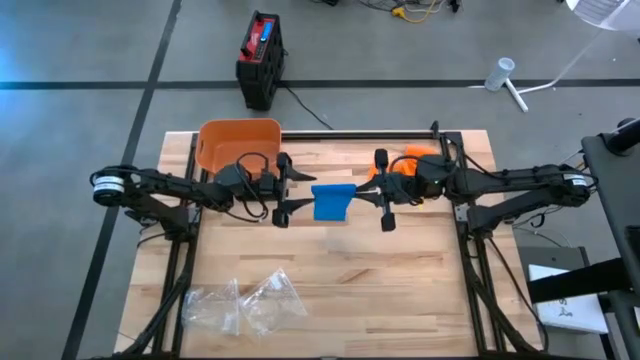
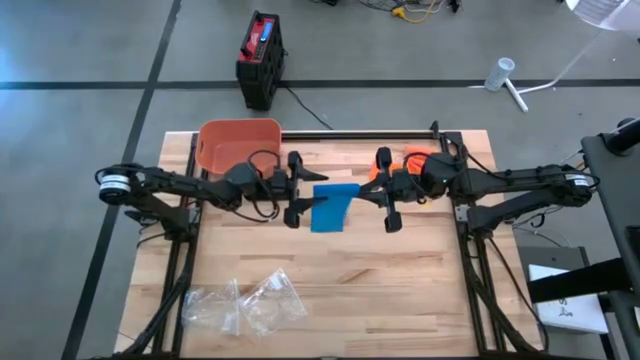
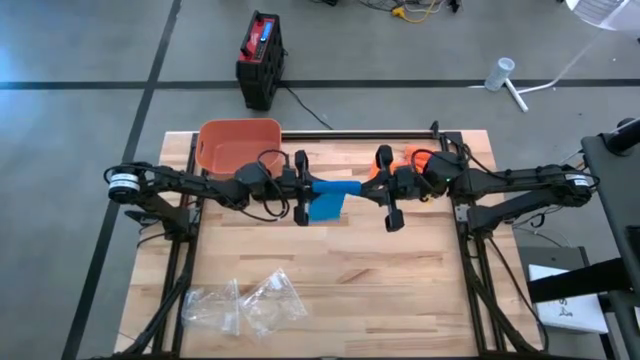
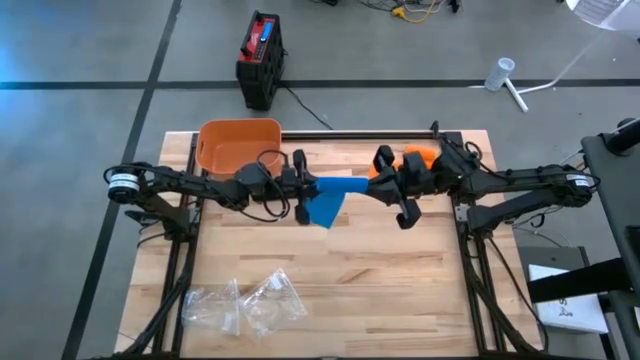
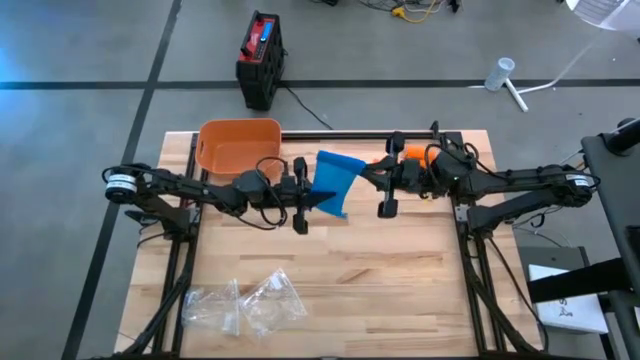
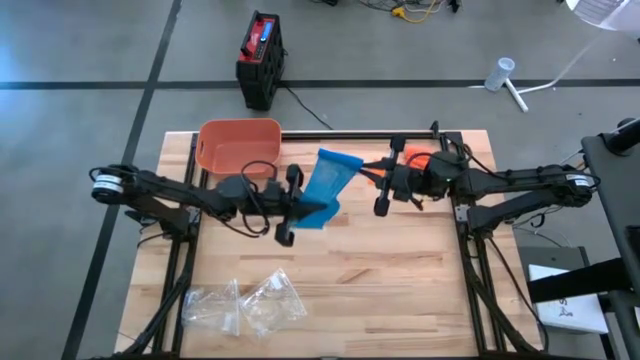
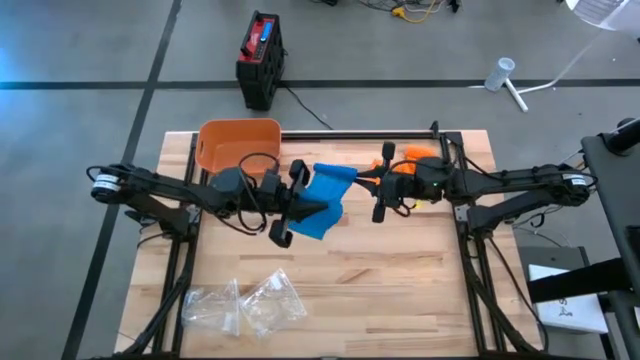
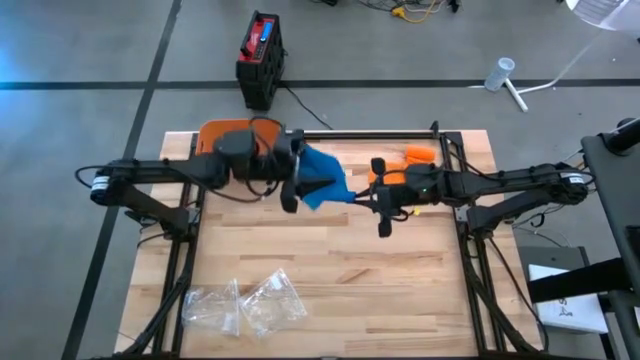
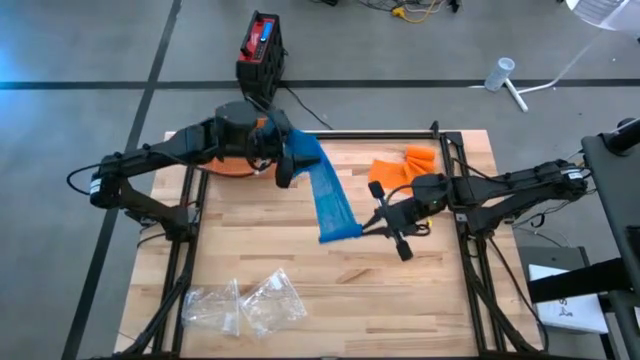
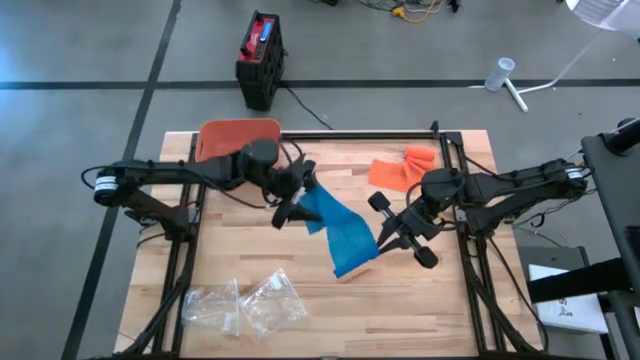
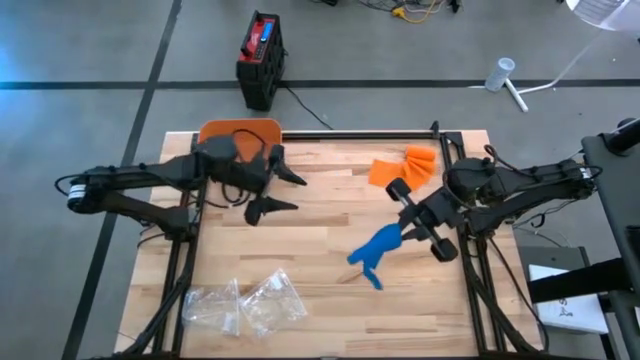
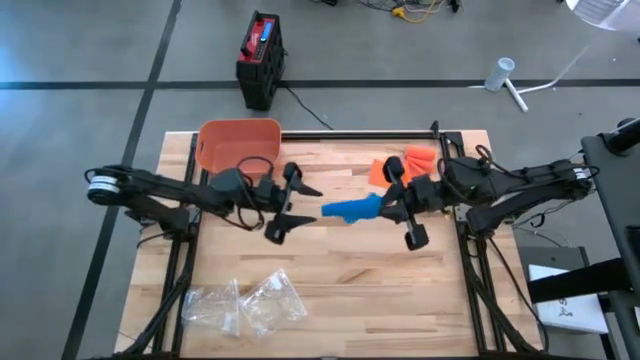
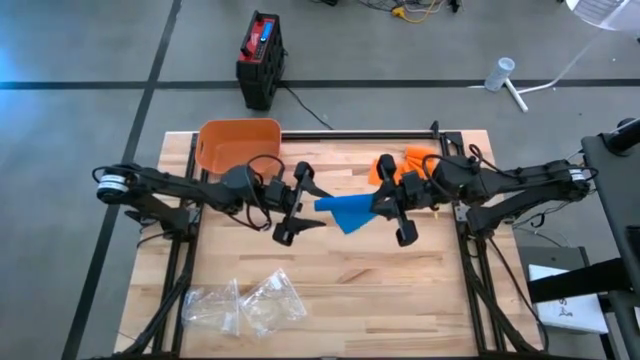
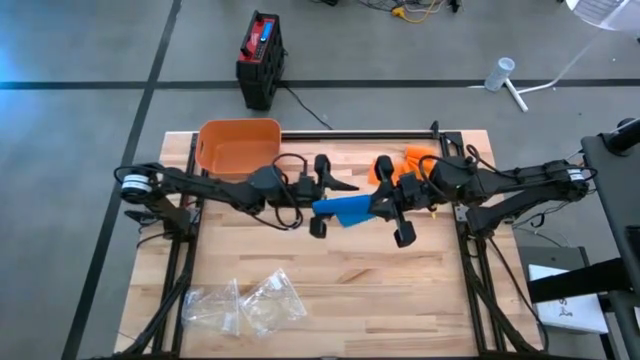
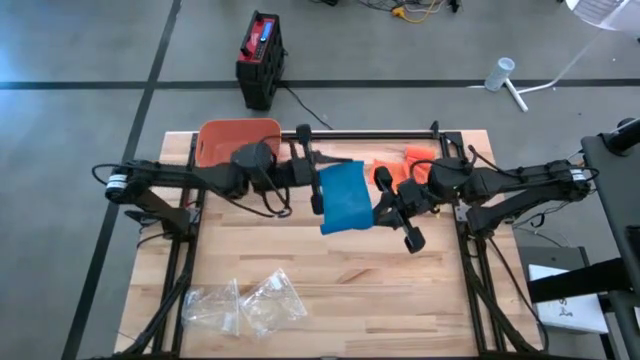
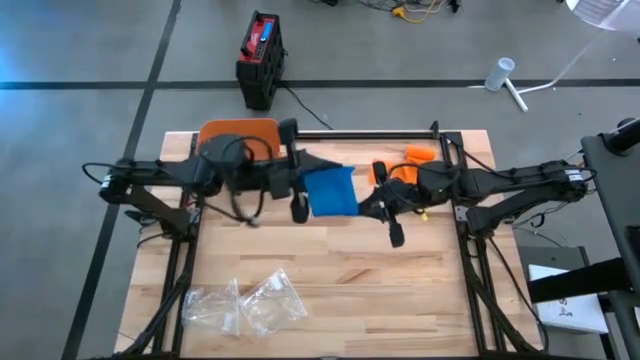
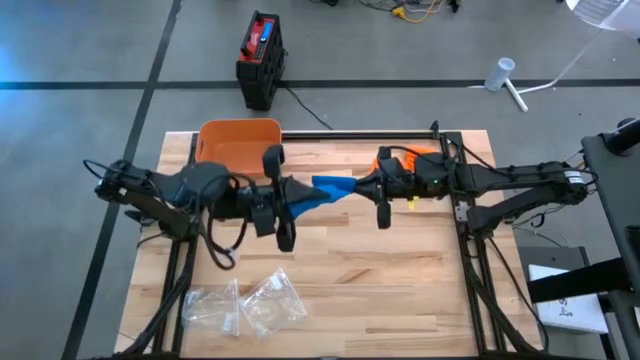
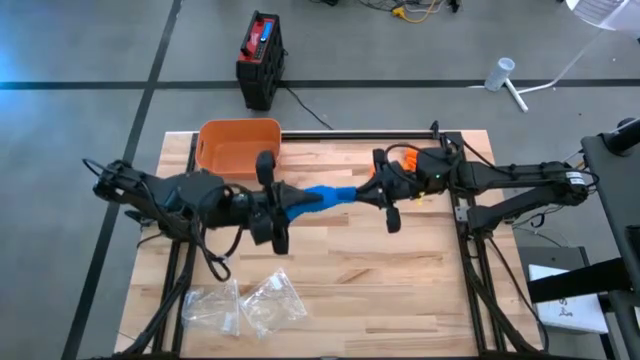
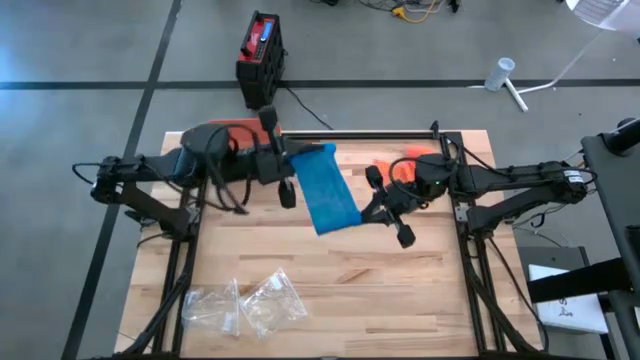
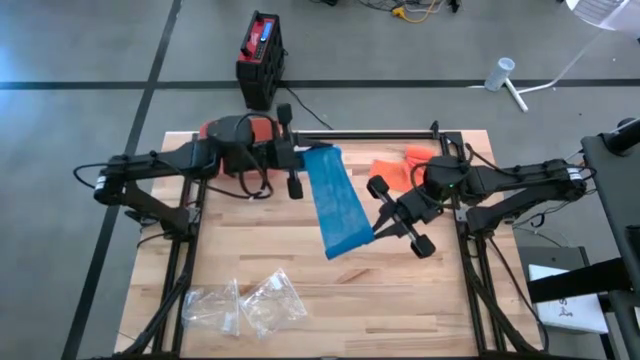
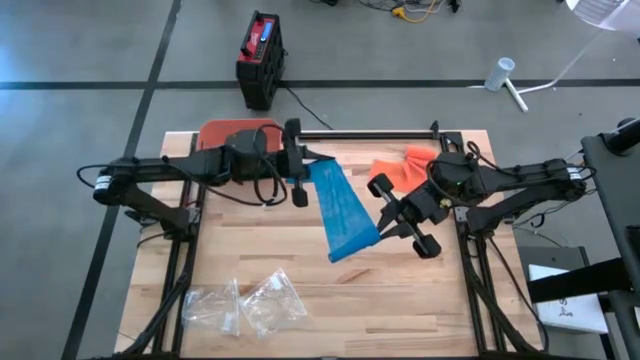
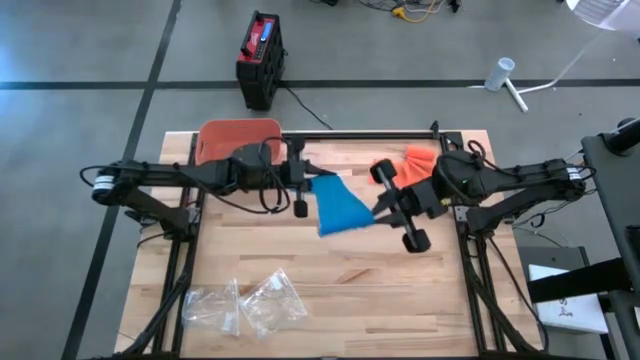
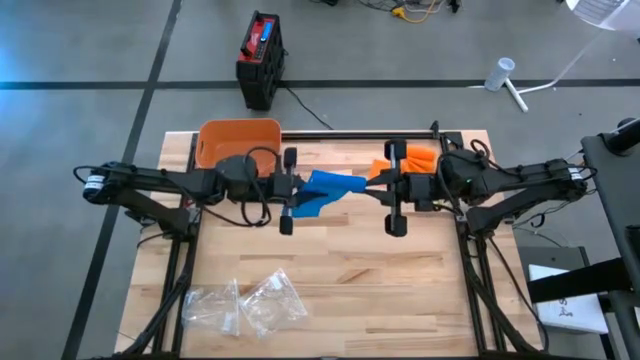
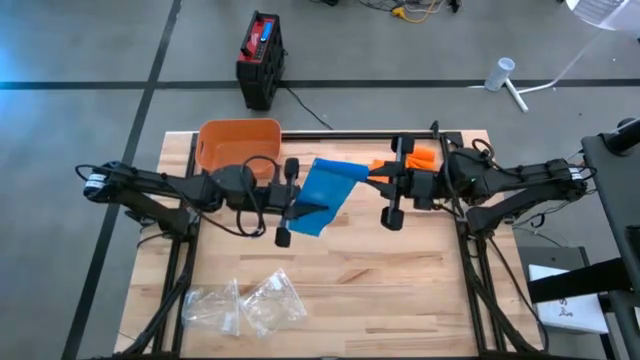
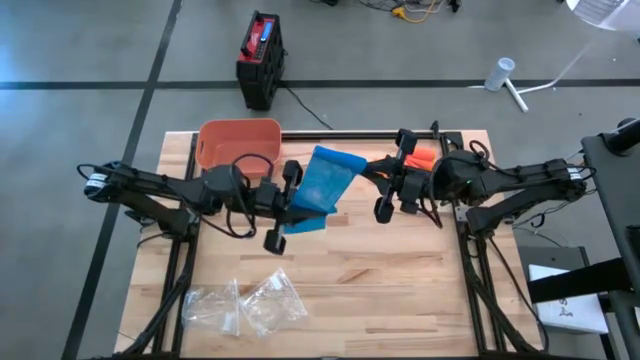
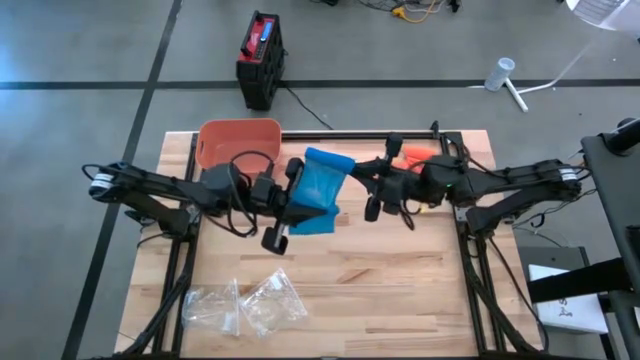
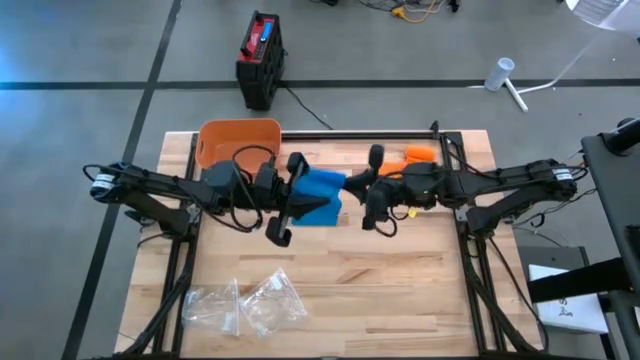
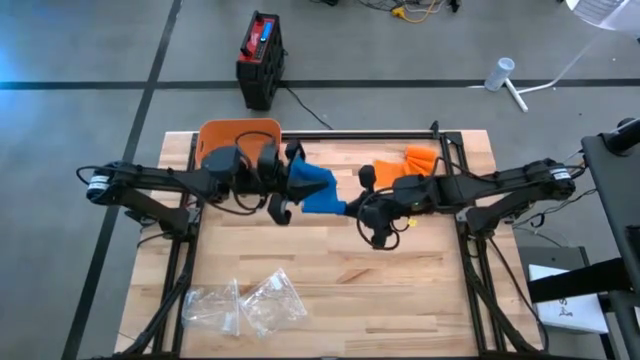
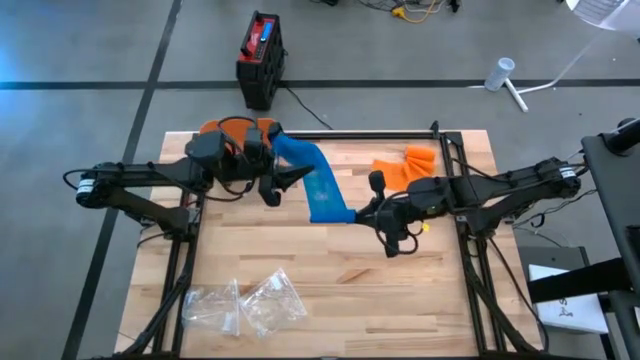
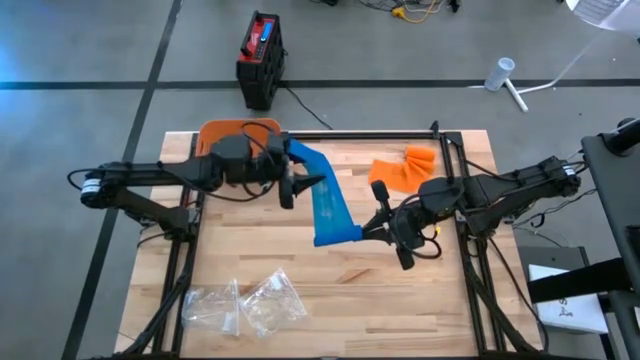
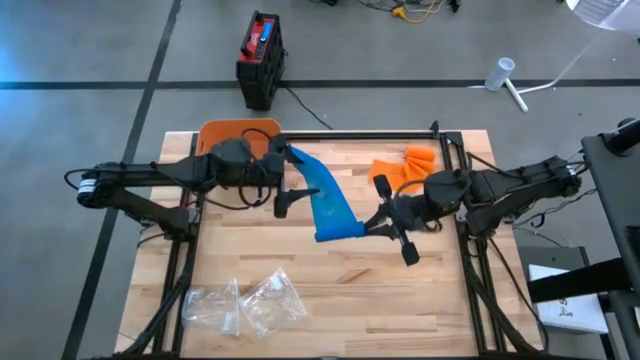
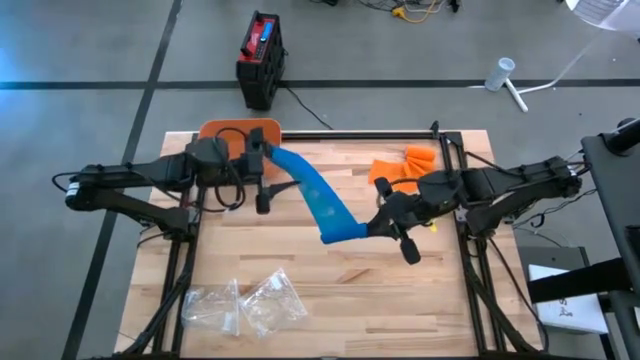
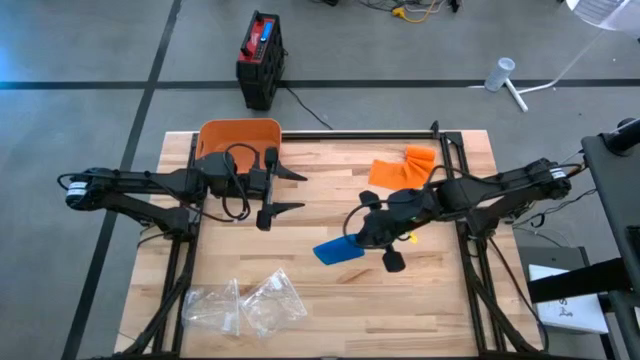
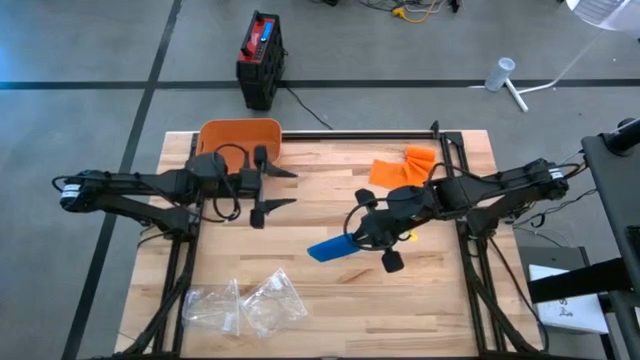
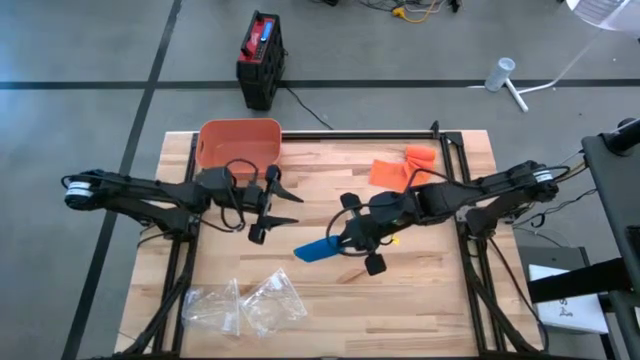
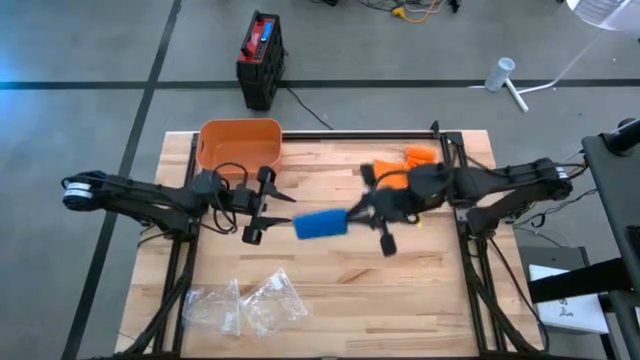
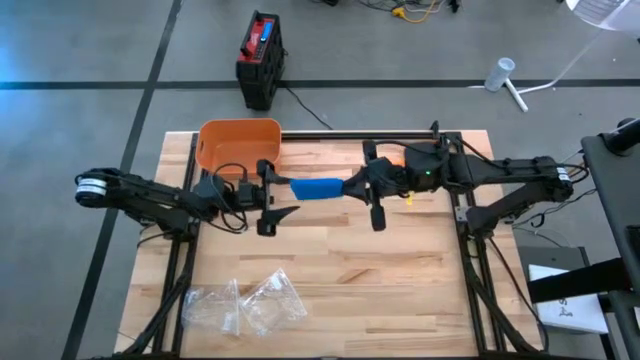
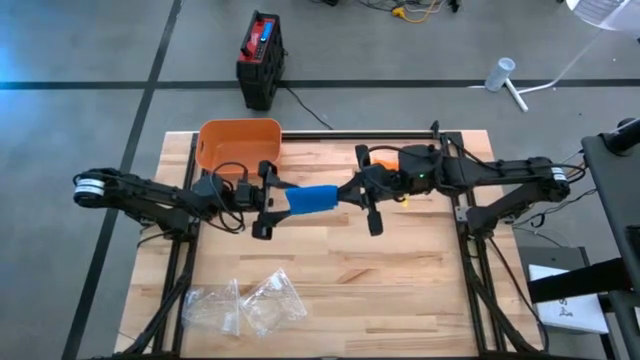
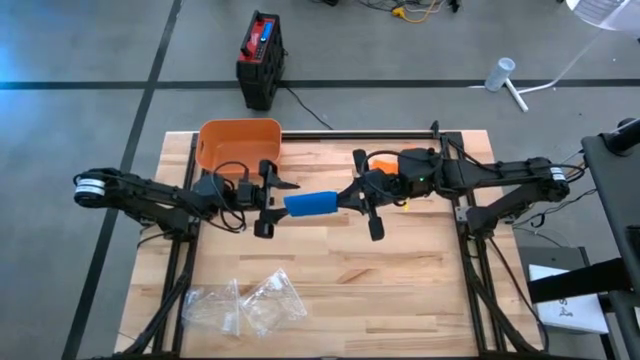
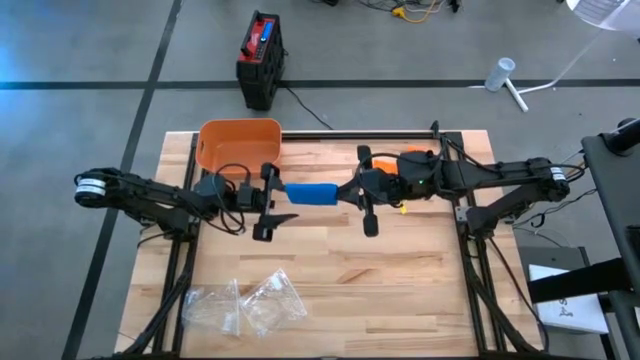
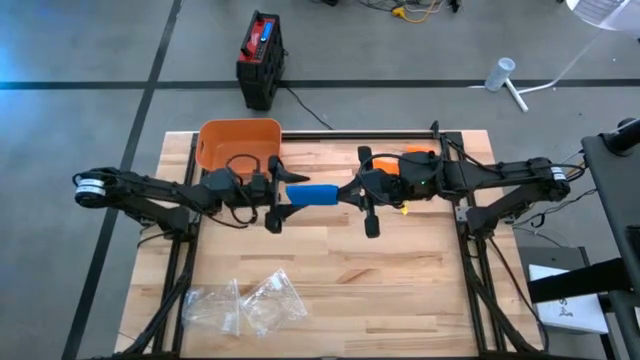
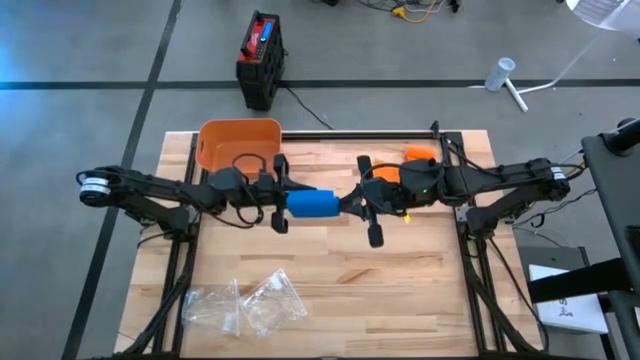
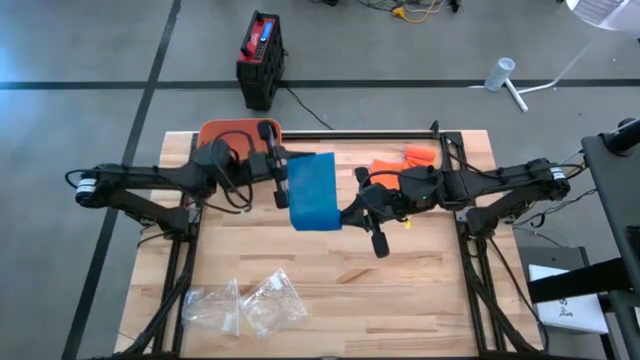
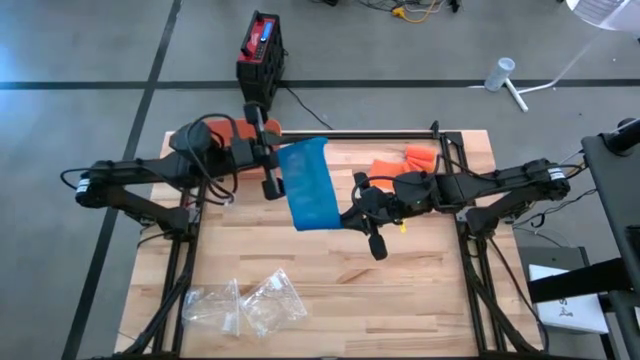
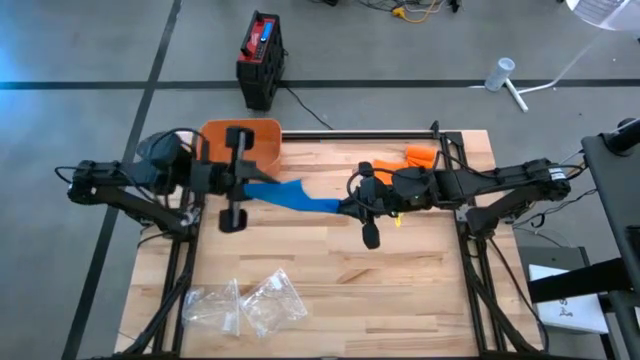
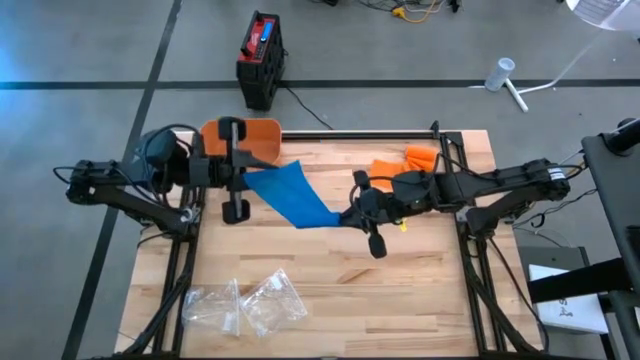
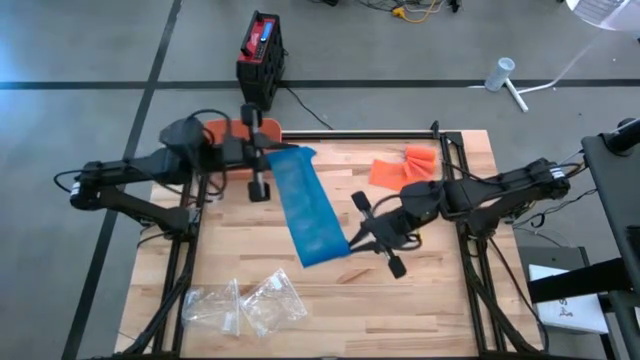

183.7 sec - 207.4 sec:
Task: Roll bandage
Roll the blue bandage
